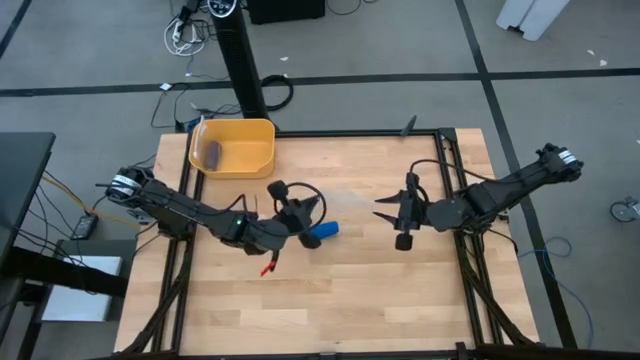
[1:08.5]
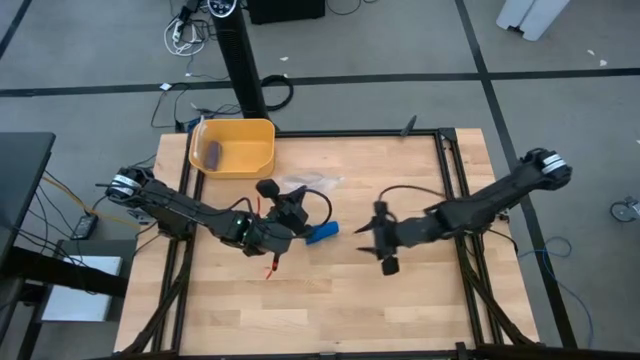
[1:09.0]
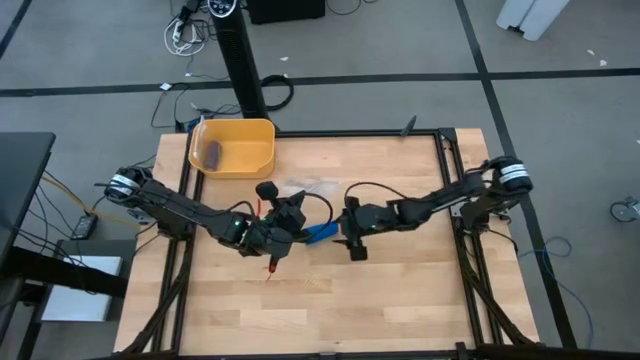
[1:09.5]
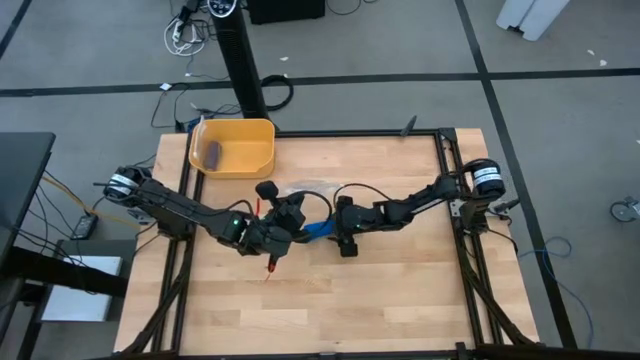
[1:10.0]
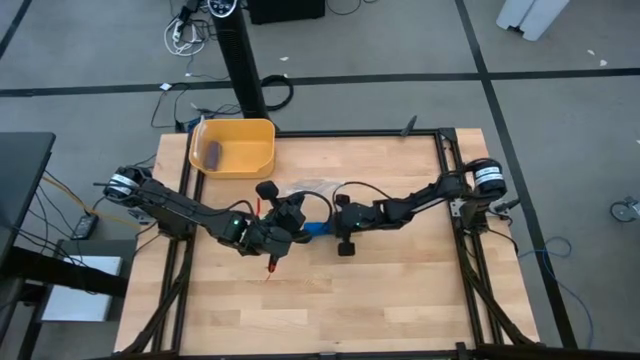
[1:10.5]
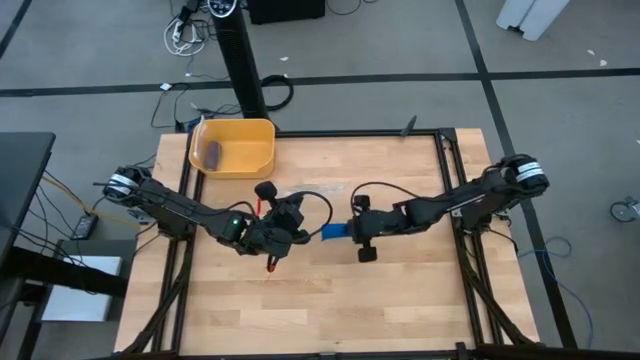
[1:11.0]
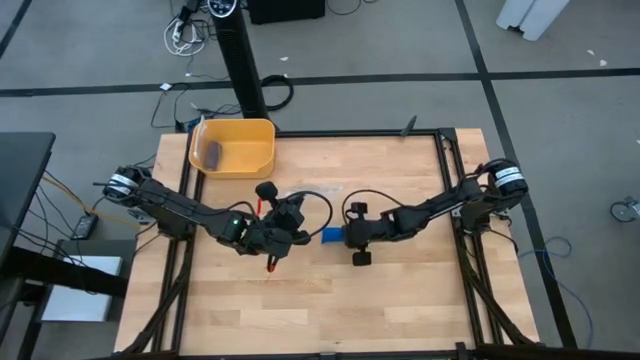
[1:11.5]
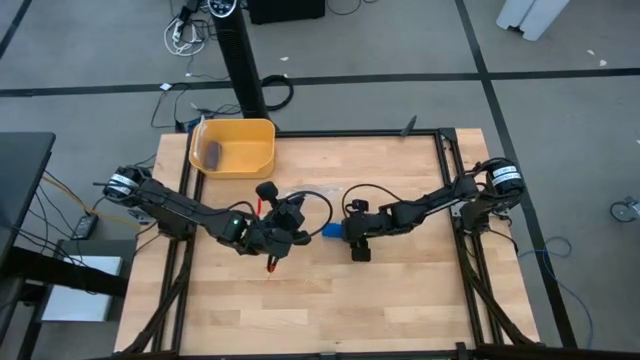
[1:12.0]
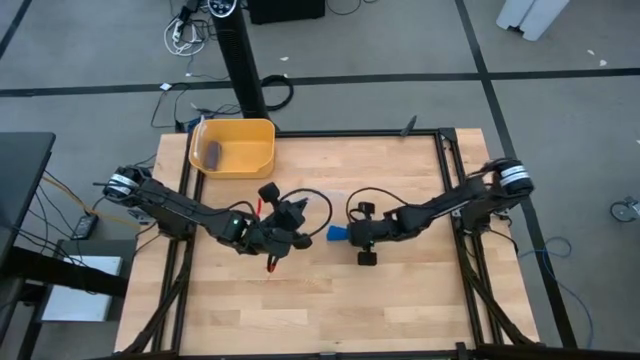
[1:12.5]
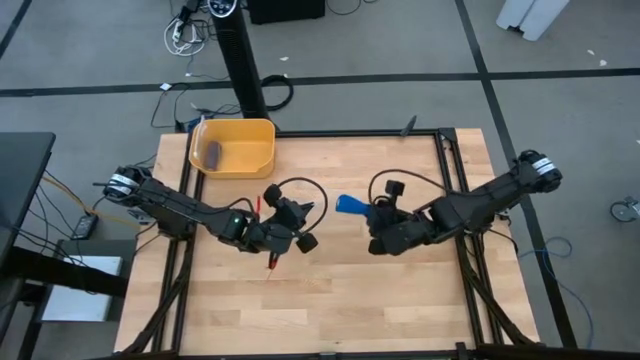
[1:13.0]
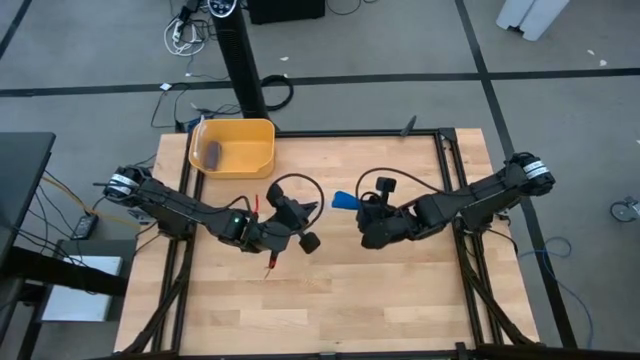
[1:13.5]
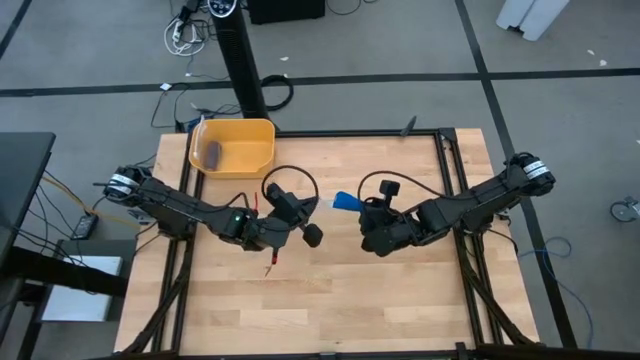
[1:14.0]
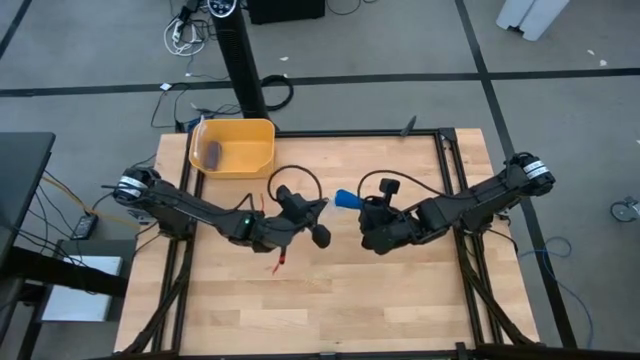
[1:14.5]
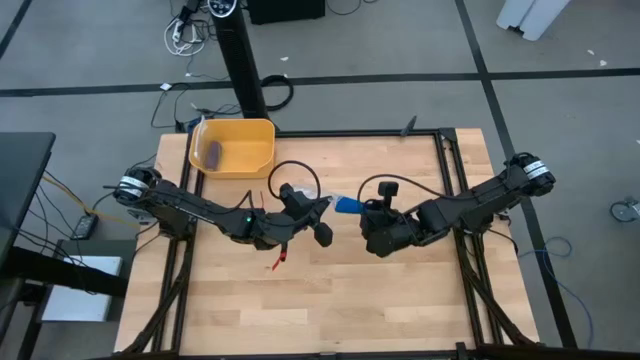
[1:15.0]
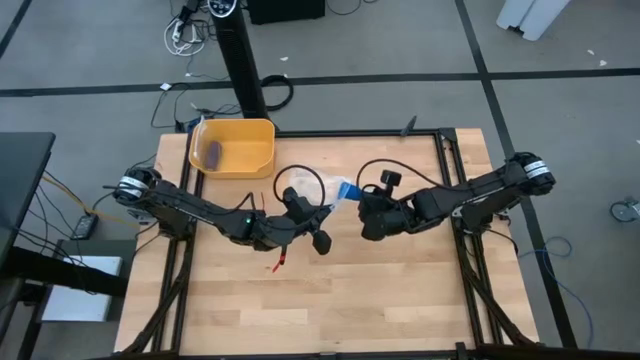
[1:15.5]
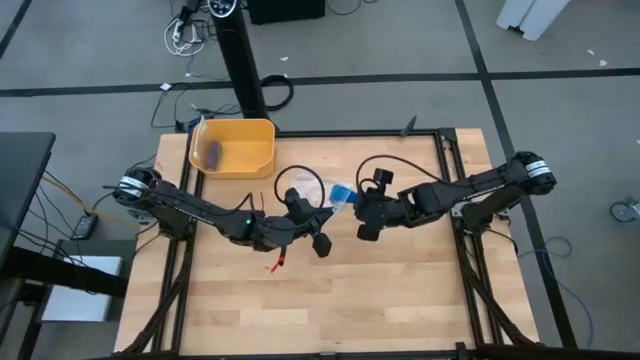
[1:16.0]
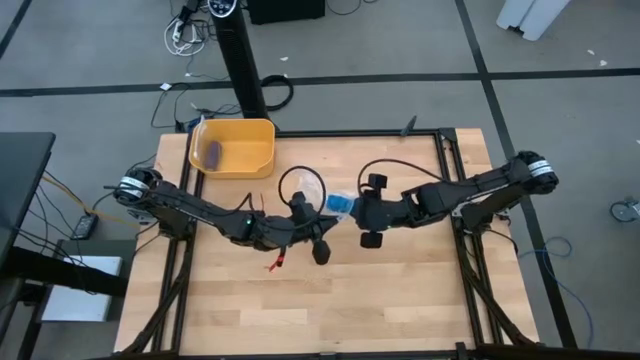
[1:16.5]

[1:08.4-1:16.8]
Task: Roll bandage
Put the blue bandage into the transparent zip bag

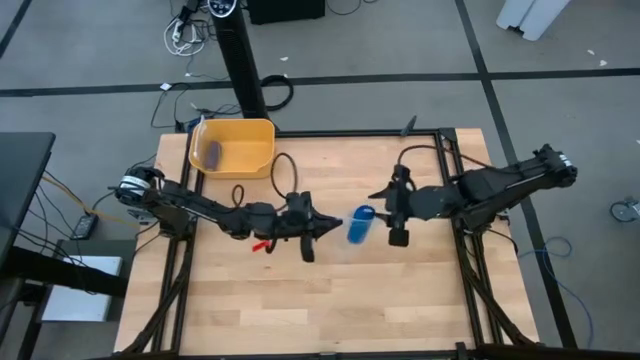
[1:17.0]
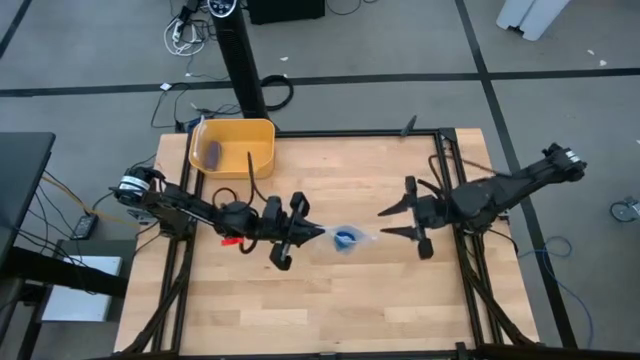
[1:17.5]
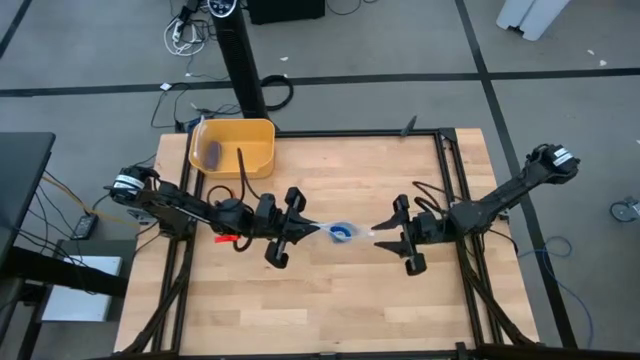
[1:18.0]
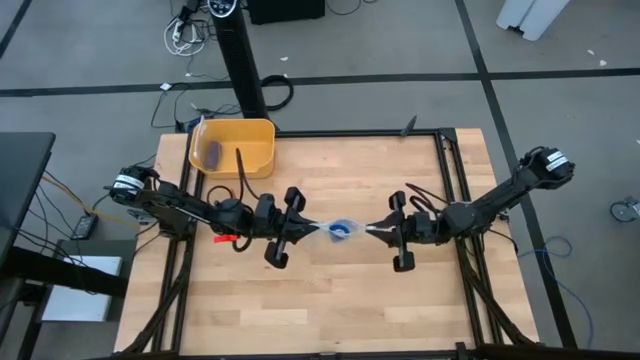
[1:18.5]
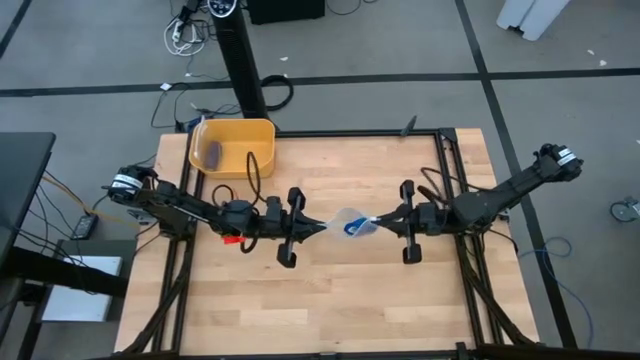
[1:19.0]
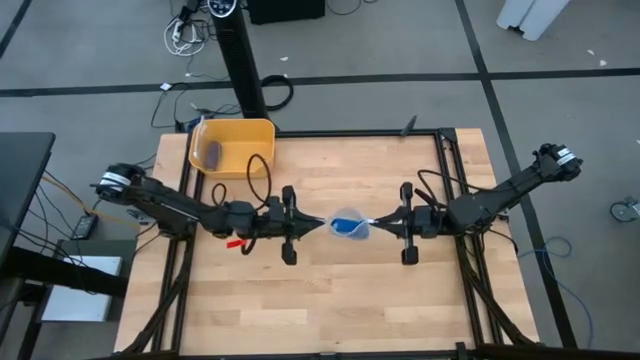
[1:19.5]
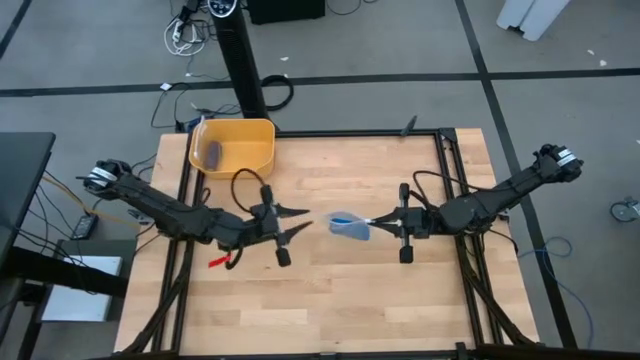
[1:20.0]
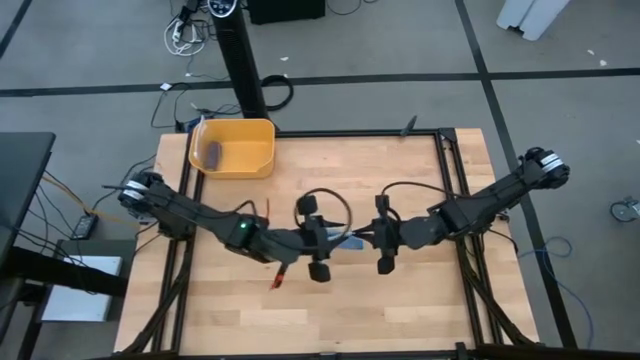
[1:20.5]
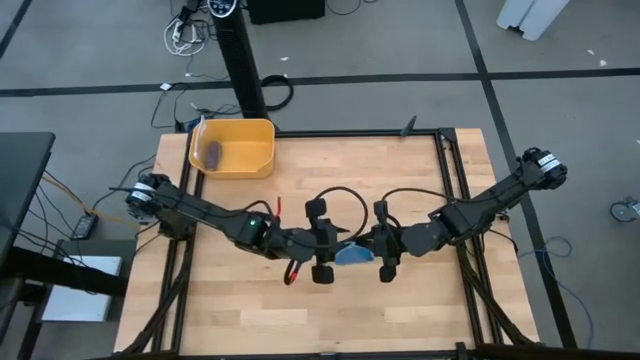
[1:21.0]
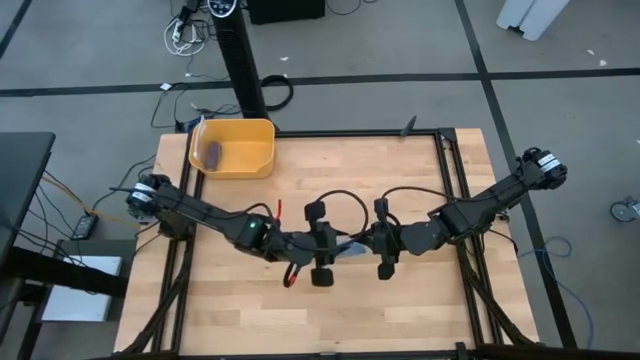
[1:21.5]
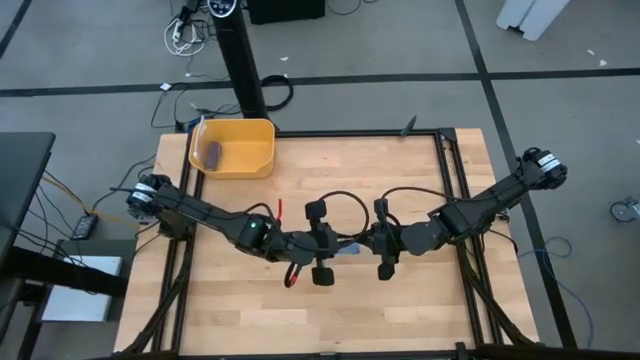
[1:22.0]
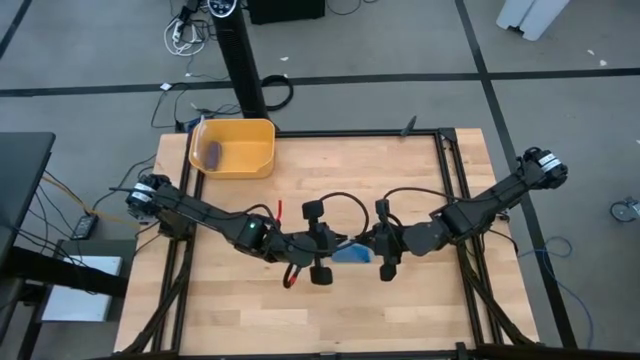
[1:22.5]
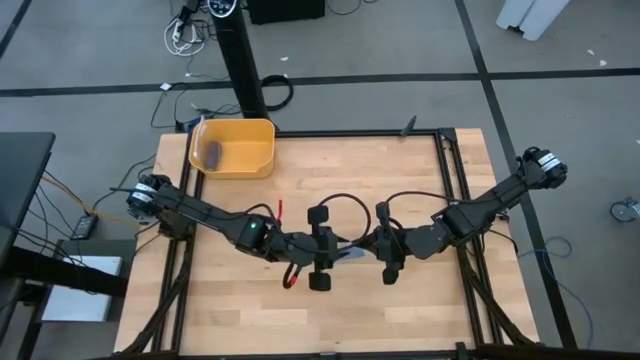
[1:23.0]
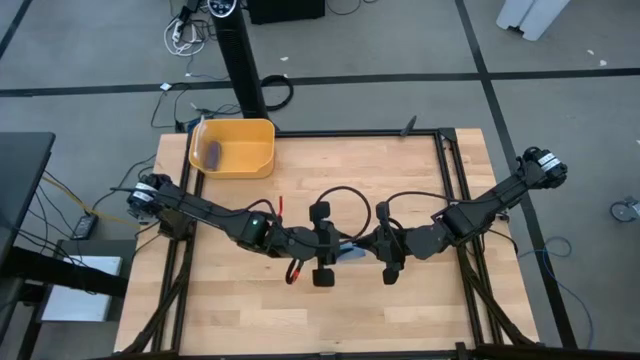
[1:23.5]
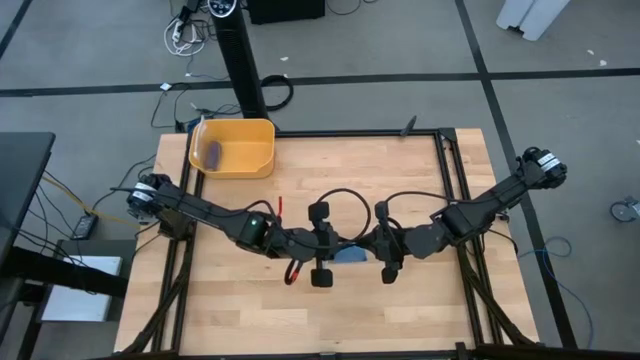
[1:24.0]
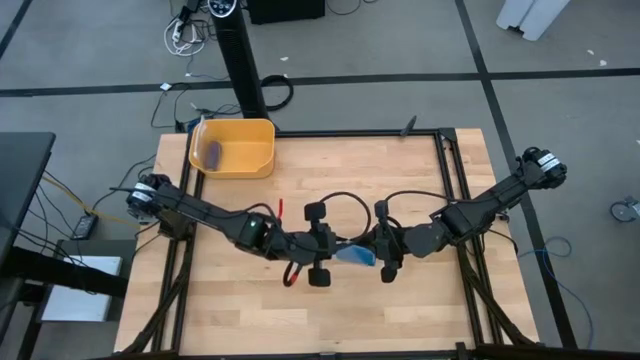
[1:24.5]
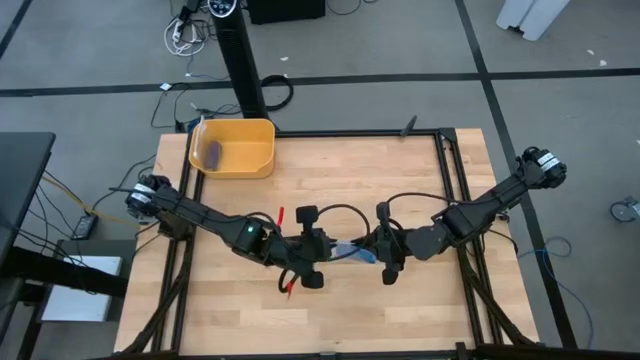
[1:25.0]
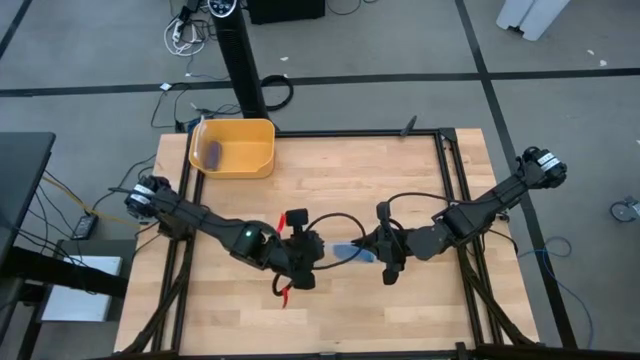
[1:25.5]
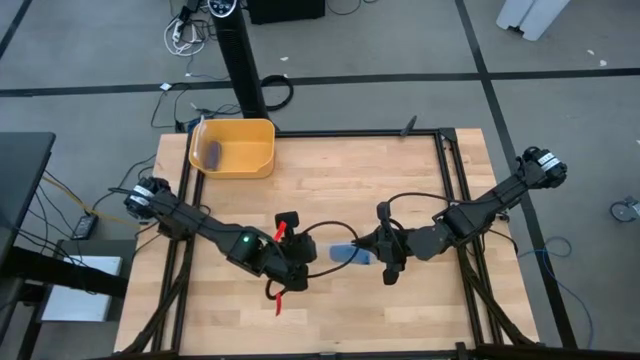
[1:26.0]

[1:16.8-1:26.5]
Close the transparent zip bag

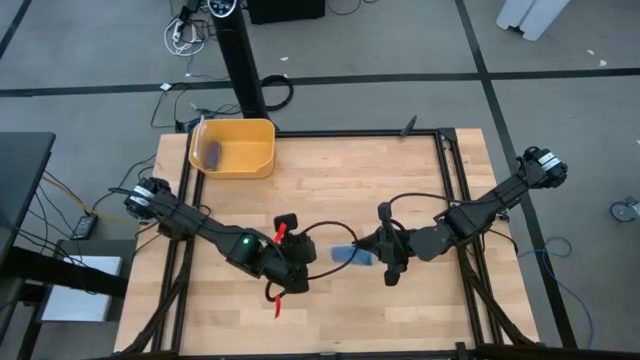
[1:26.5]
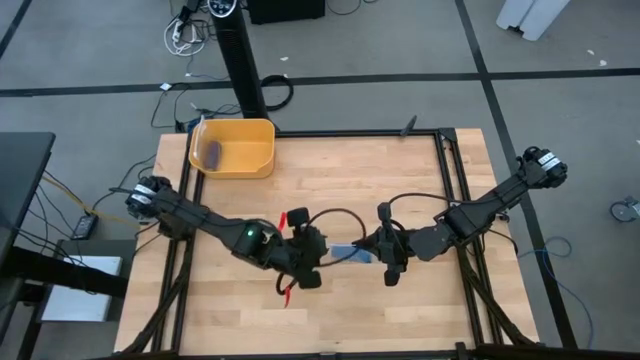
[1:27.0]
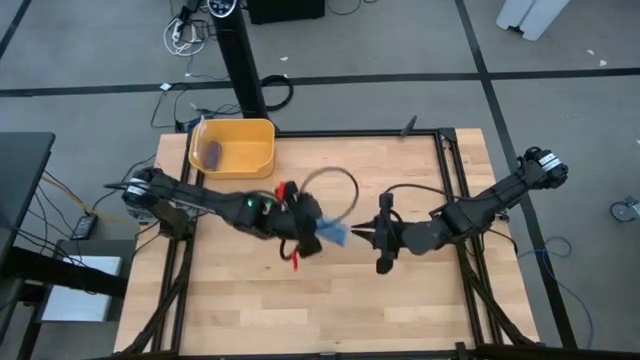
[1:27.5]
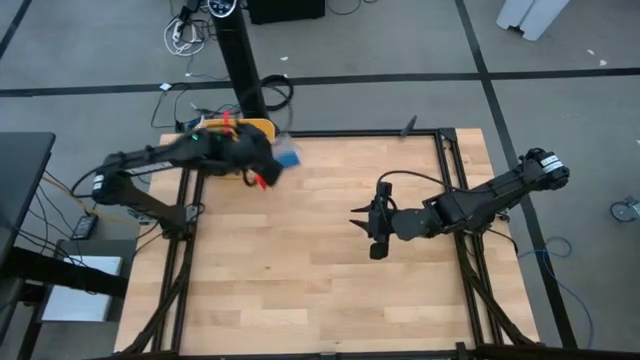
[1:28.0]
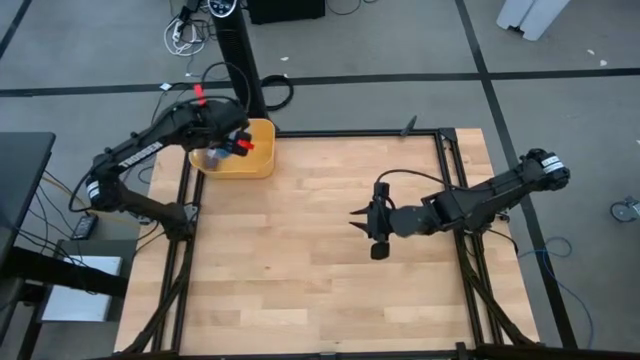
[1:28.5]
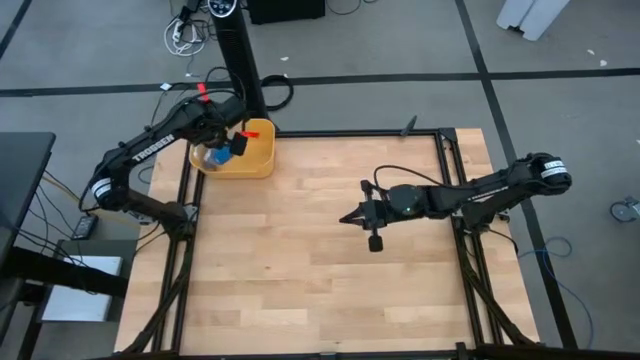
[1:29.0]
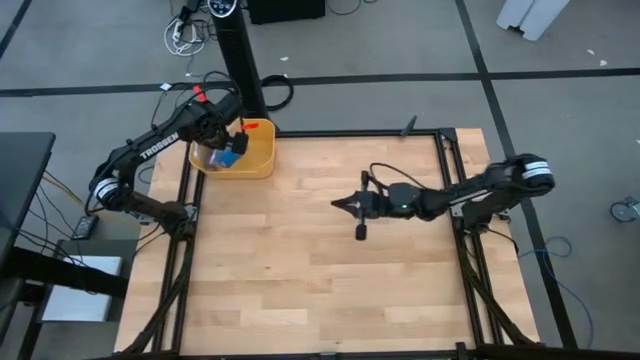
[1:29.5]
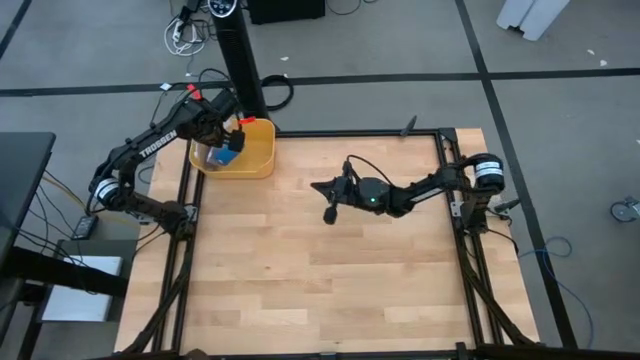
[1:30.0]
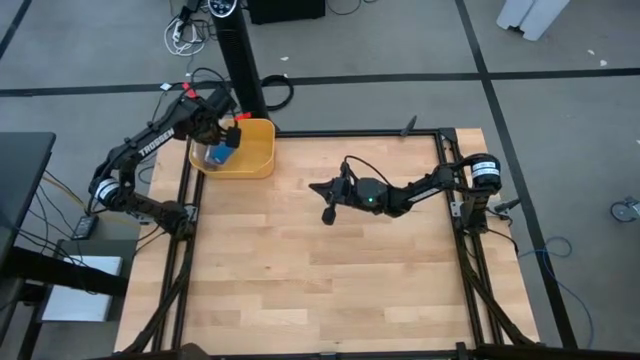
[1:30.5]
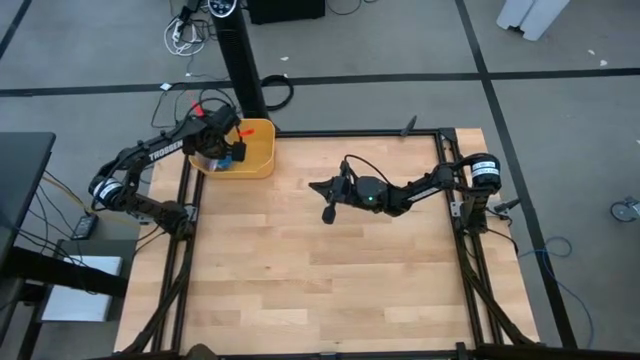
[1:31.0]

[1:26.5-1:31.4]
Put the transparent zip bag into the yellow container
